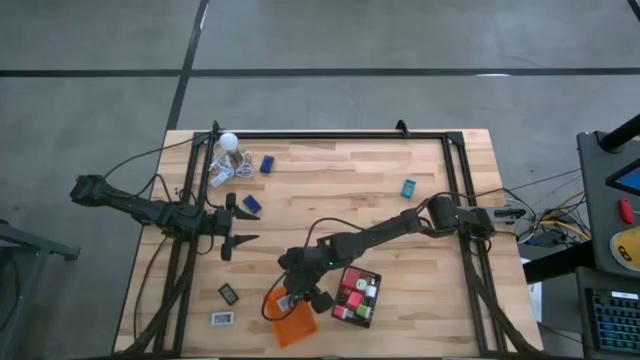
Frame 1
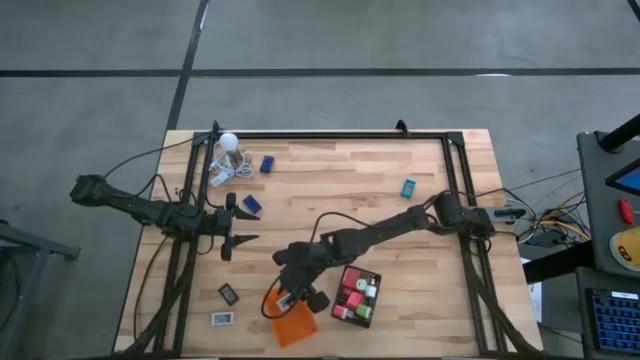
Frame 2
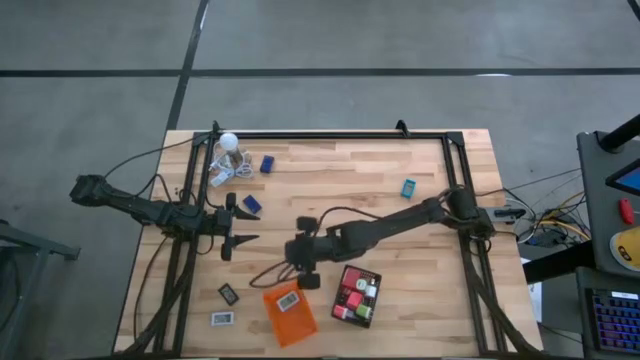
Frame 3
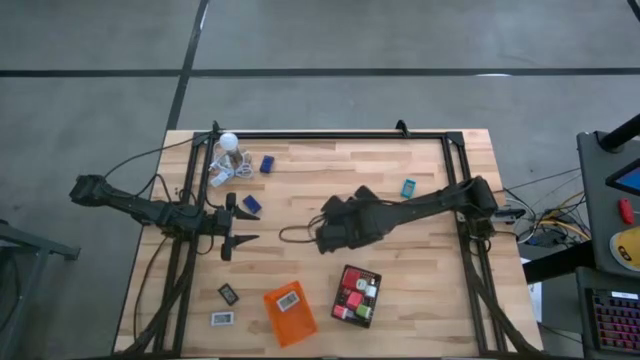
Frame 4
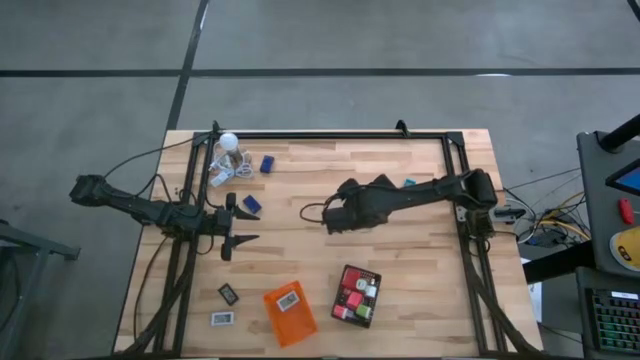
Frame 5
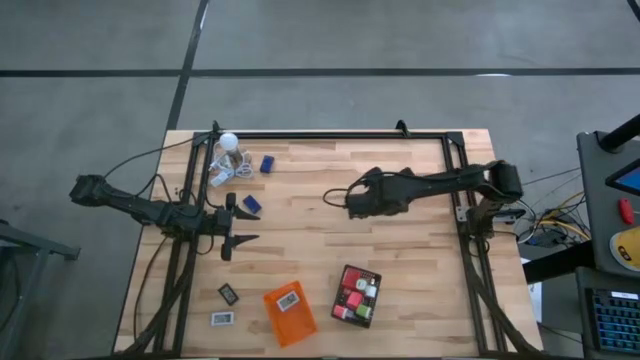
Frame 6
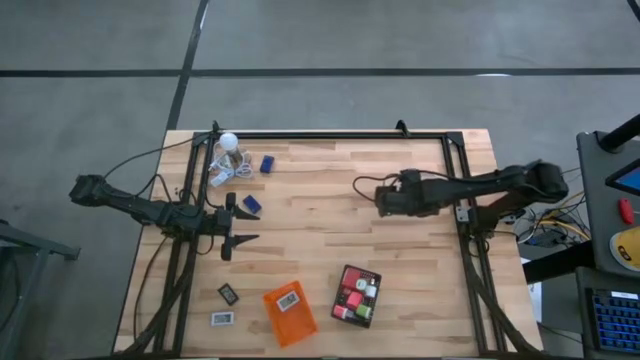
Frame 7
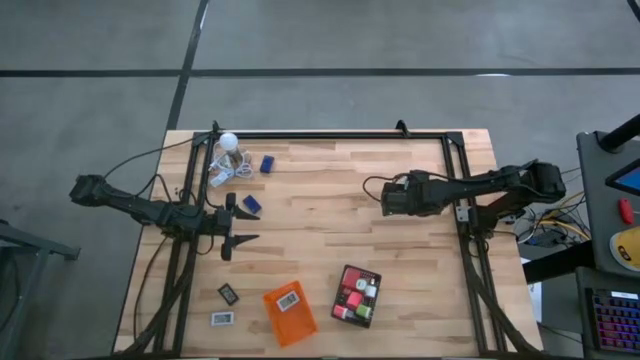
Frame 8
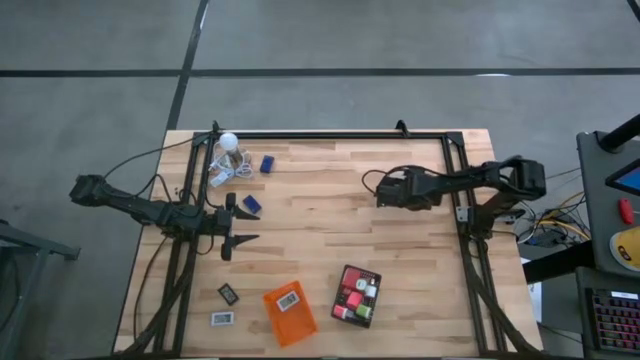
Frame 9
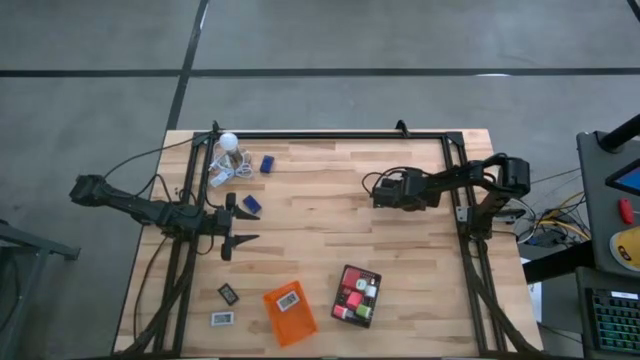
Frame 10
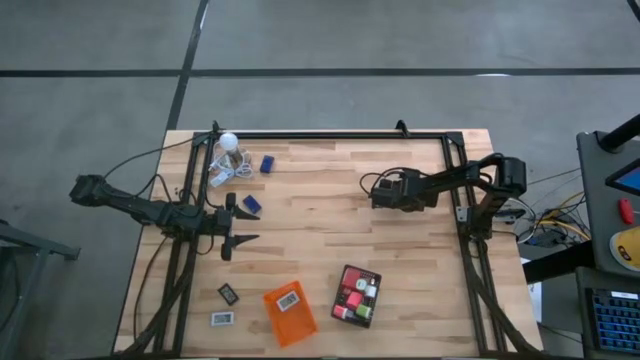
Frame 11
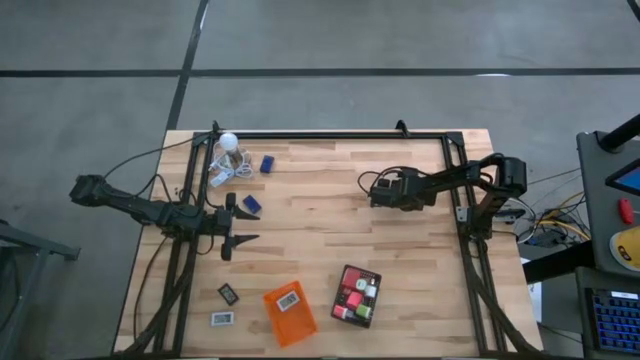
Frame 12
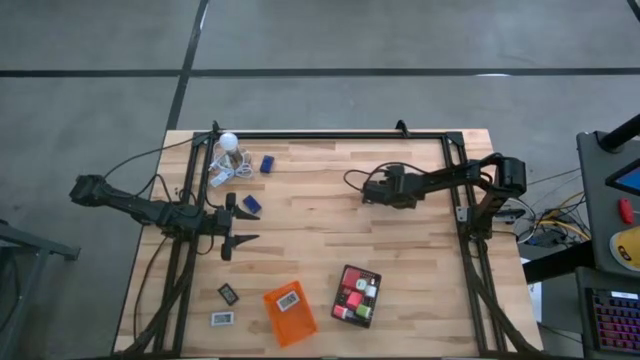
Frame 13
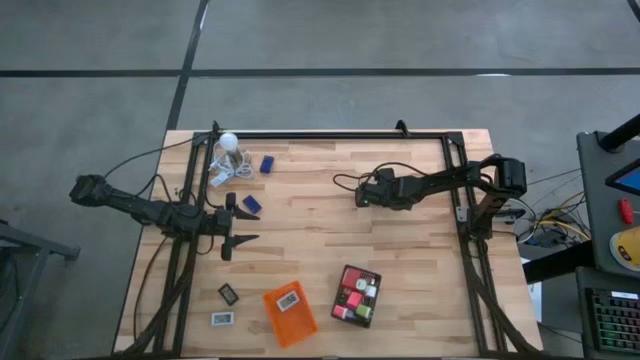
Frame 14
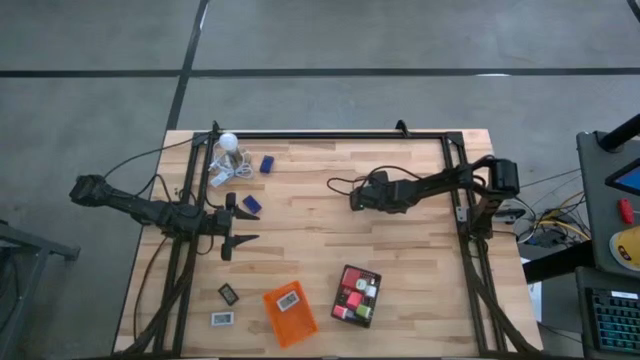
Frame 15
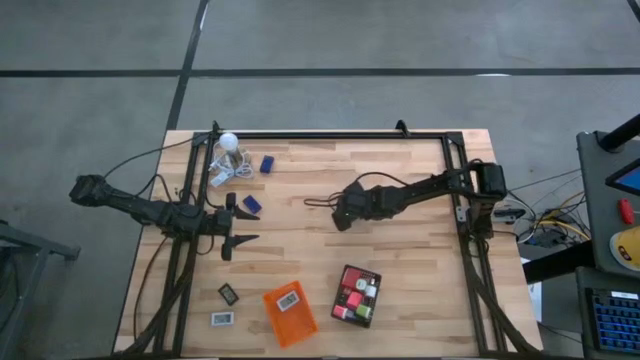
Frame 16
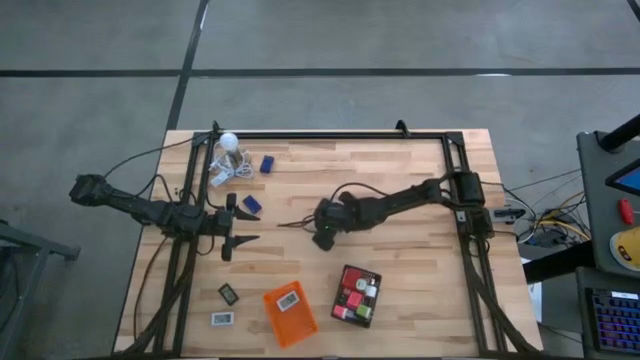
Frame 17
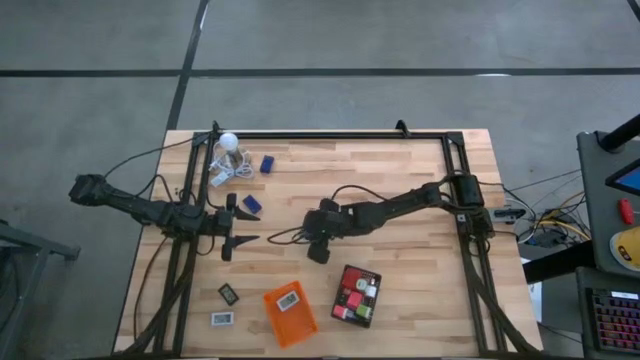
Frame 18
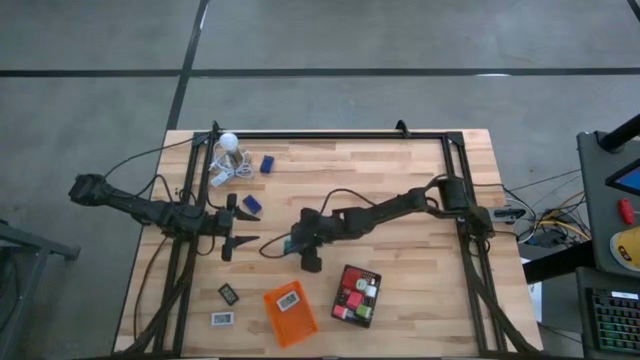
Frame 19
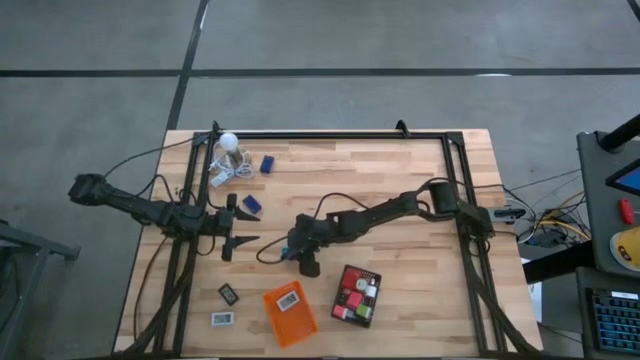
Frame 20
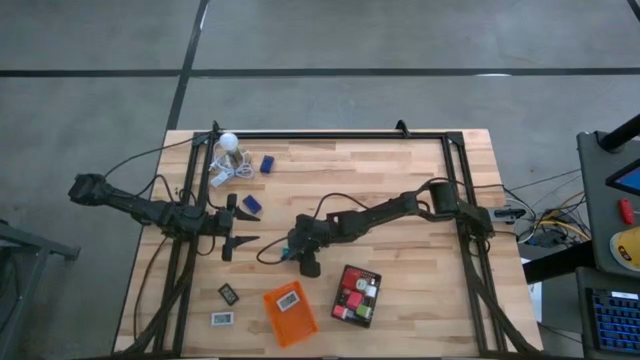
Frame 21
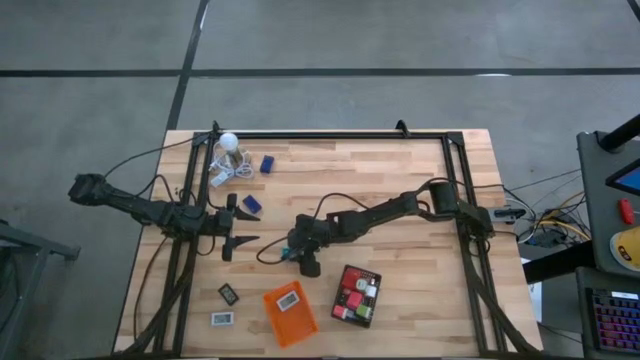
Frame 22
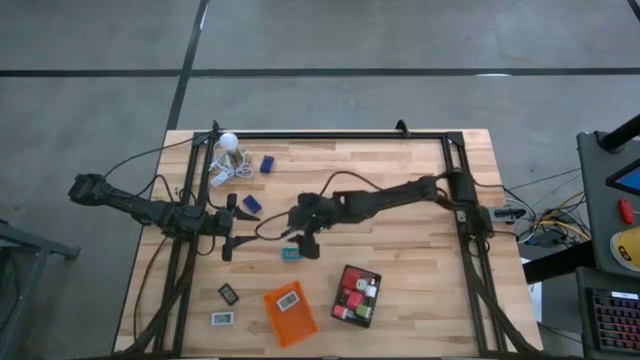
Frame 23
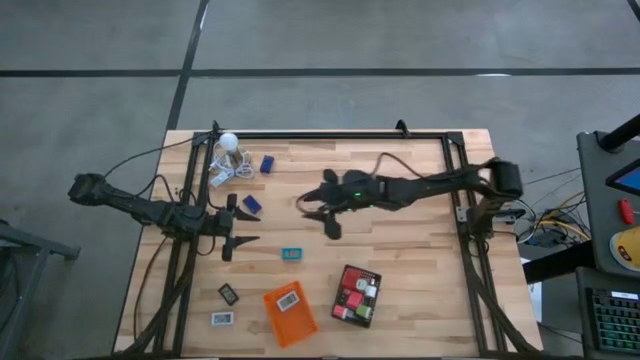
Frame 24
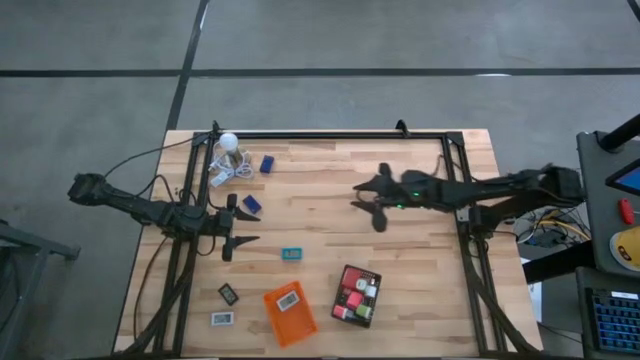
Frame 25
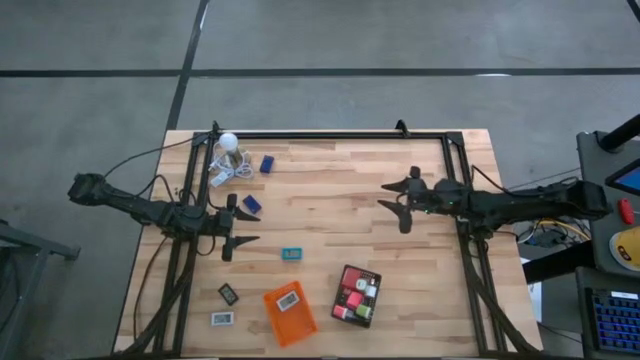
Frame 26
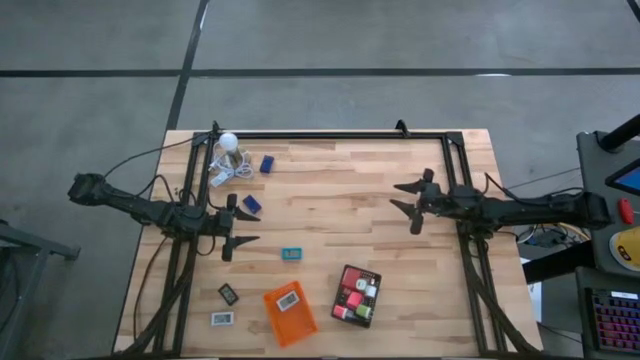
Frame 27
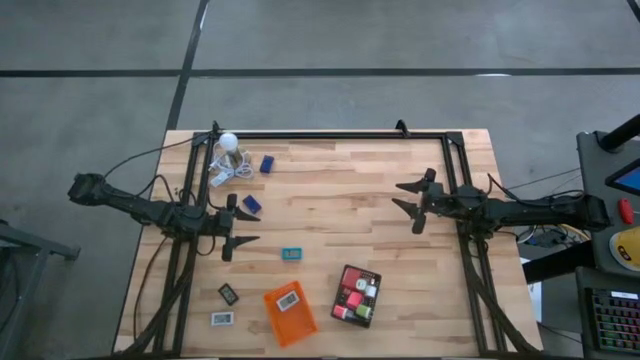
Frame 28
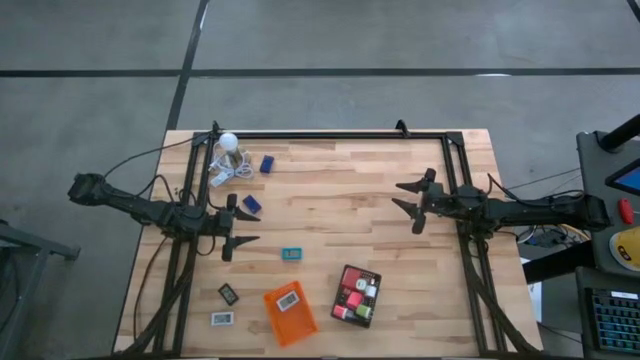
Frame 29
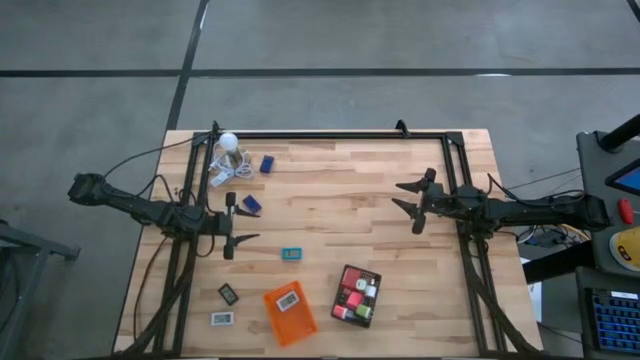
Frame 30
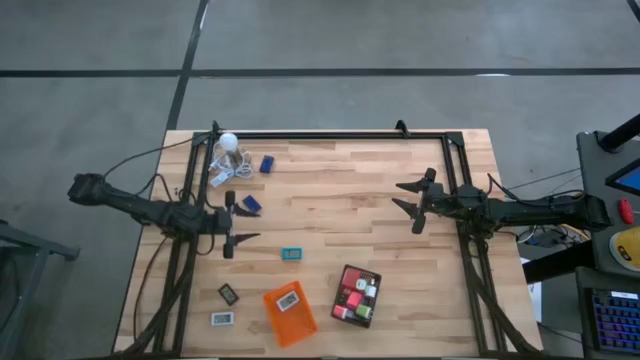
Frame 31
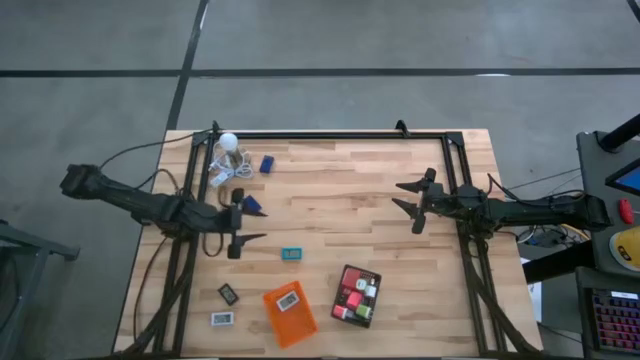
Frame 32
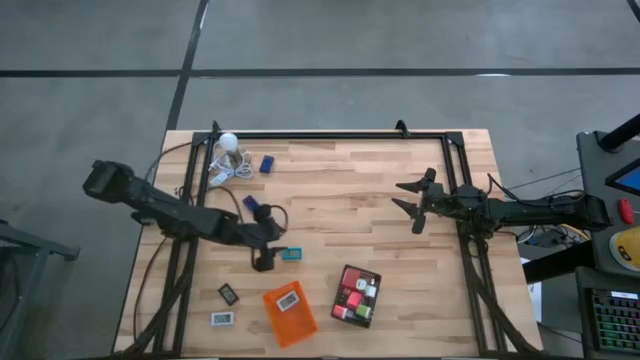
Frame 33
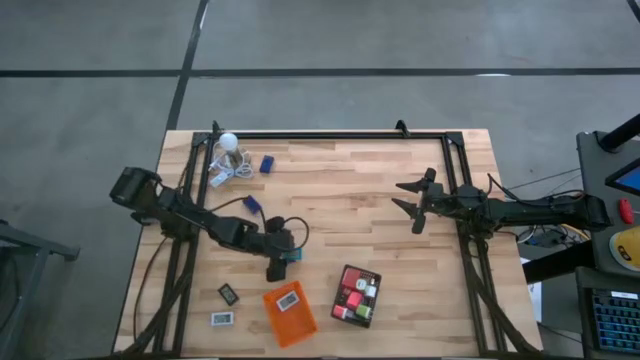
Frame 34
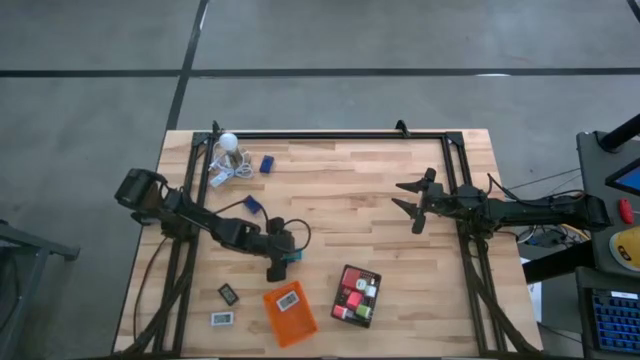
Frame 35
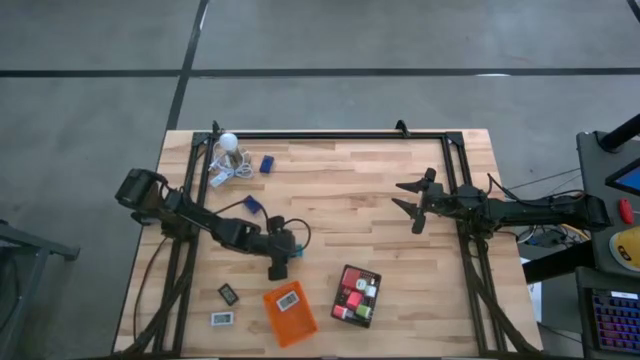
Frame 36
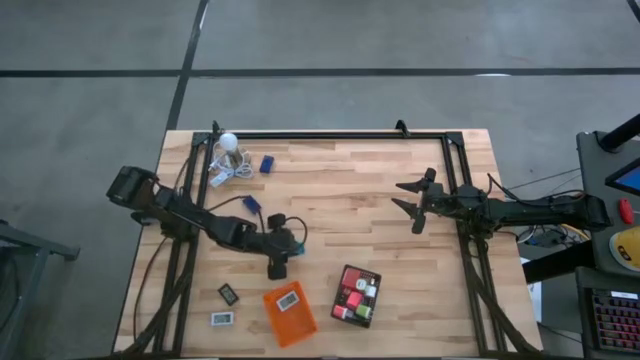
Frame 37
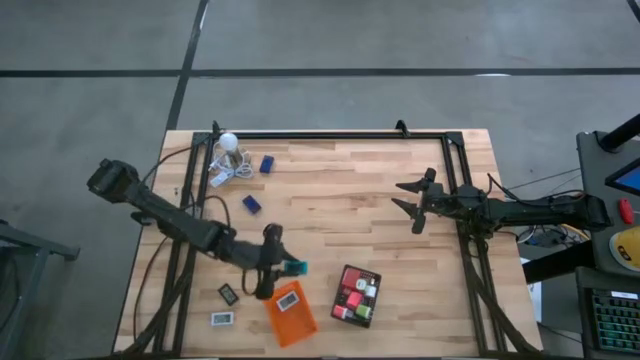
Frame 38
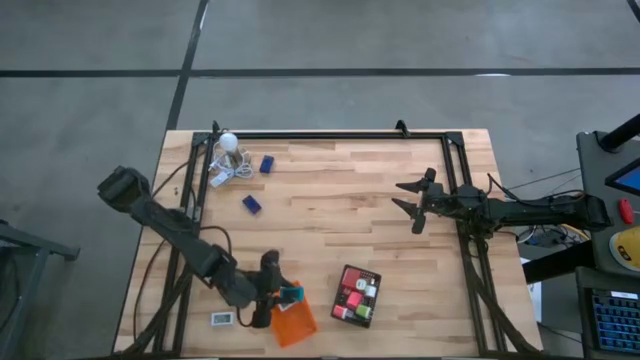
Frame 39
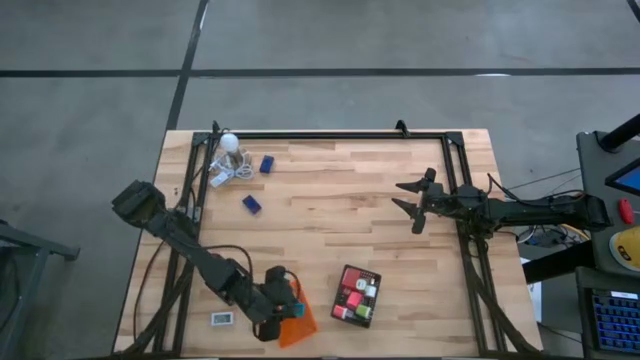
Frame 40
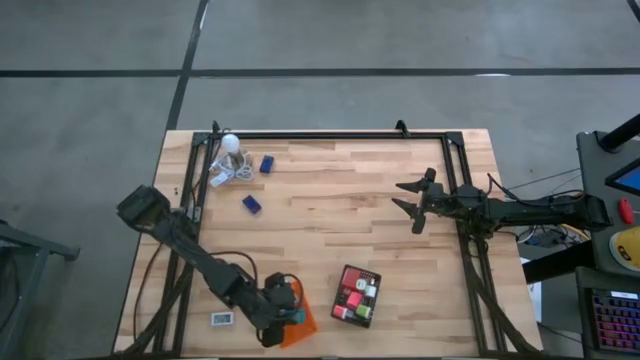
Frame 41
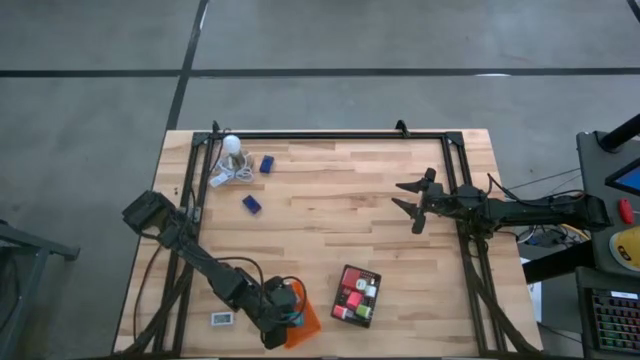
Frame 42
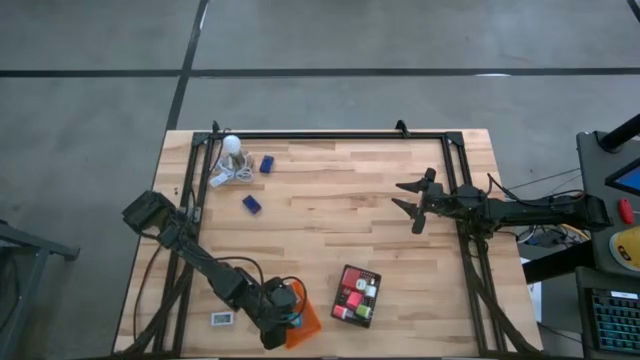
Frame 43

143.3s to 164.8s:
Task: Pick & Place Office items
Put the sky blue timer into the orange bin
